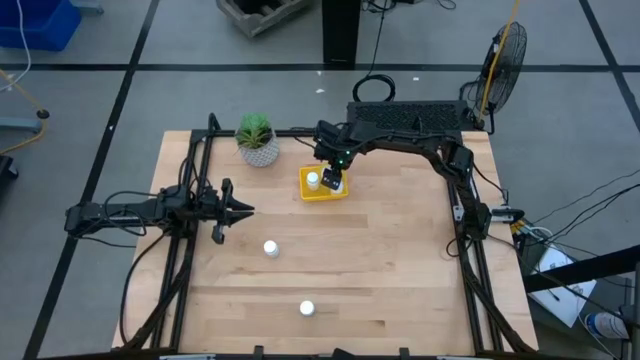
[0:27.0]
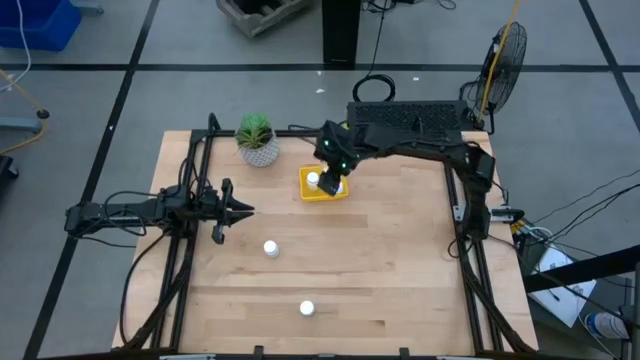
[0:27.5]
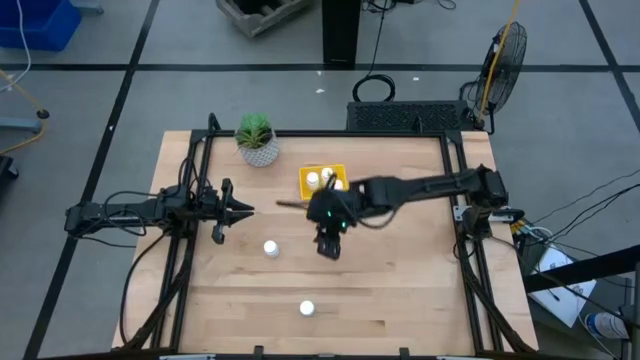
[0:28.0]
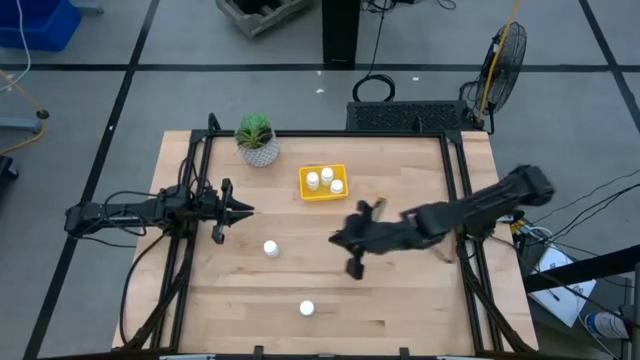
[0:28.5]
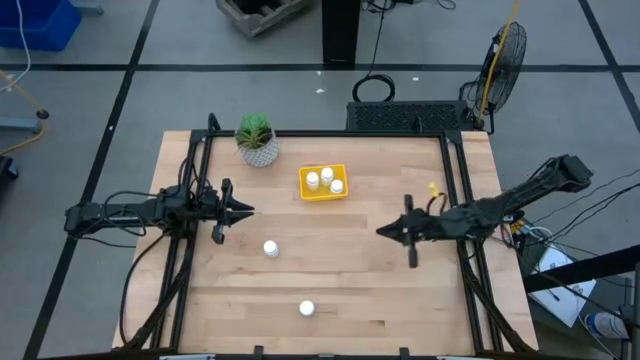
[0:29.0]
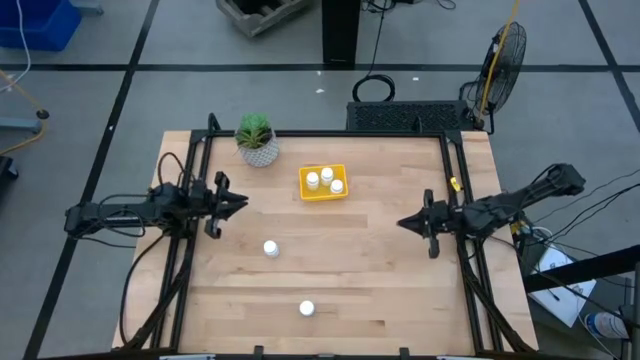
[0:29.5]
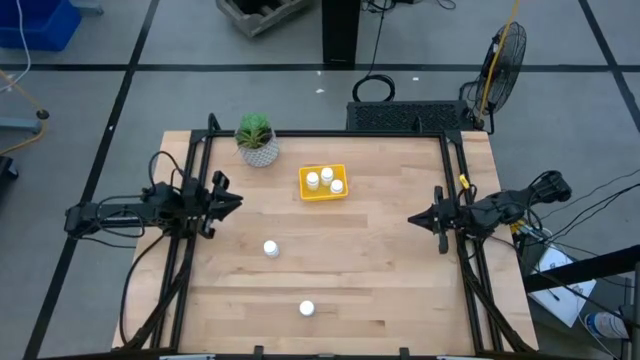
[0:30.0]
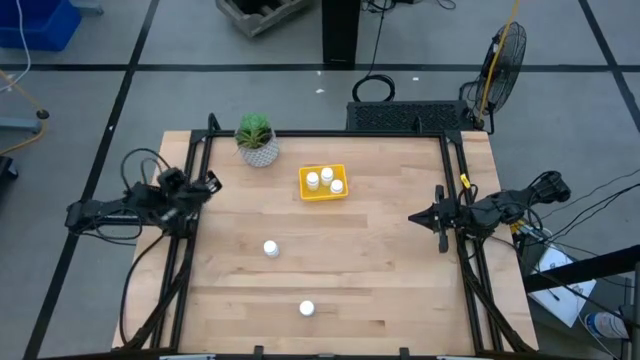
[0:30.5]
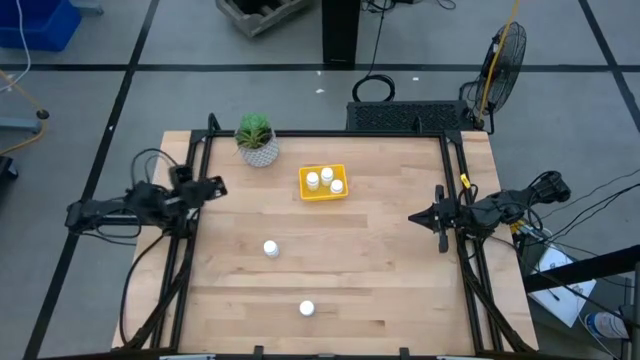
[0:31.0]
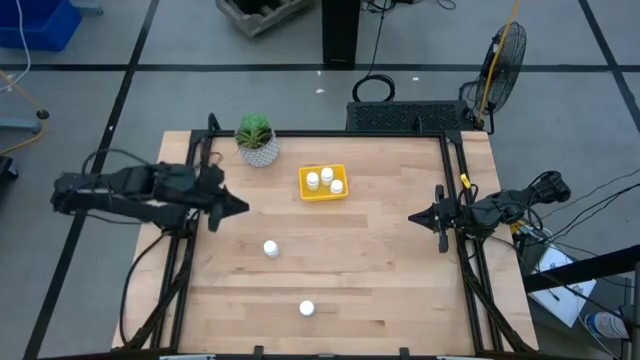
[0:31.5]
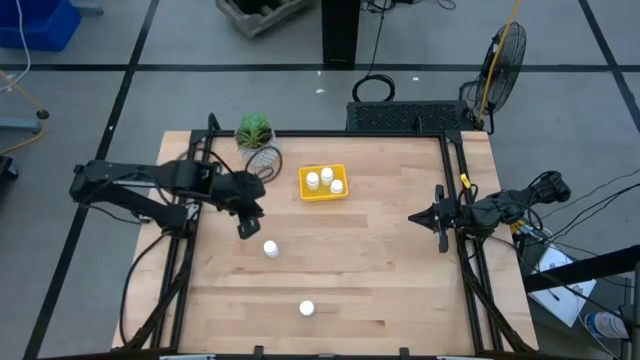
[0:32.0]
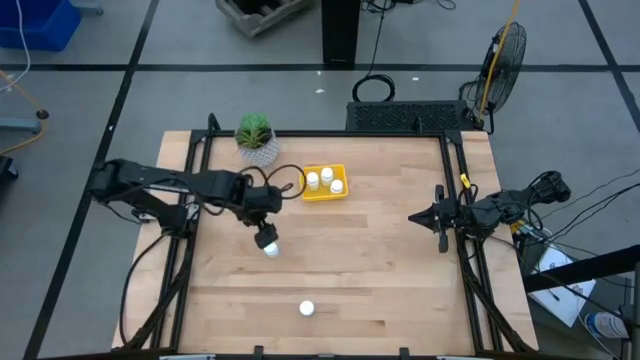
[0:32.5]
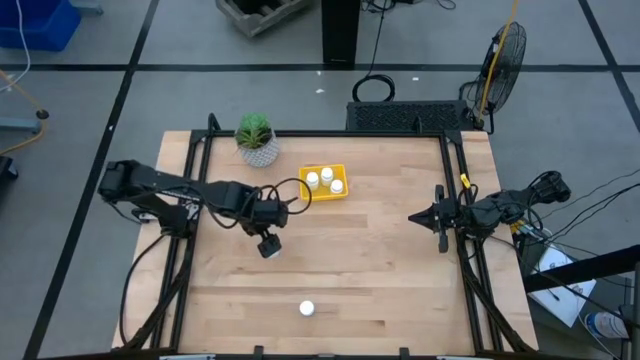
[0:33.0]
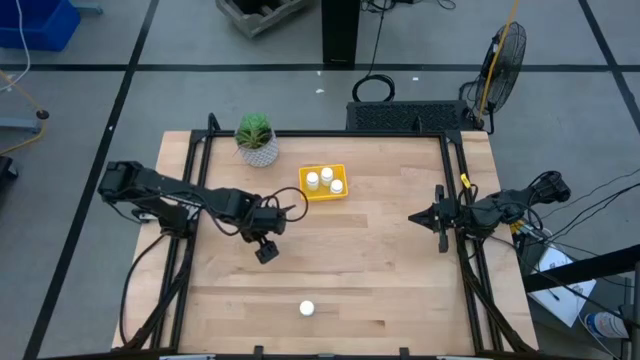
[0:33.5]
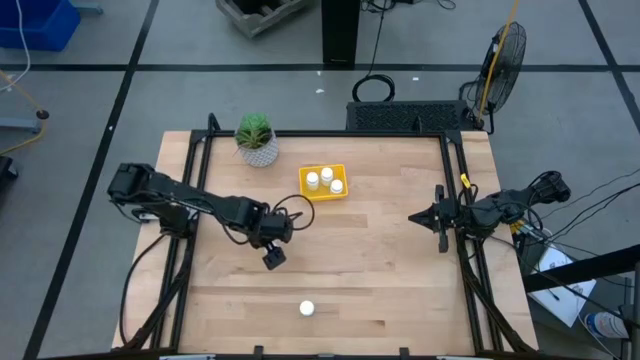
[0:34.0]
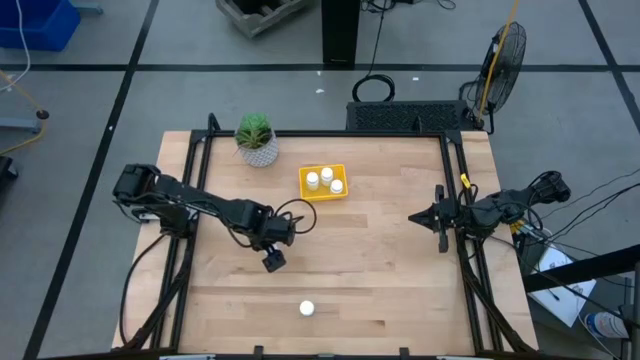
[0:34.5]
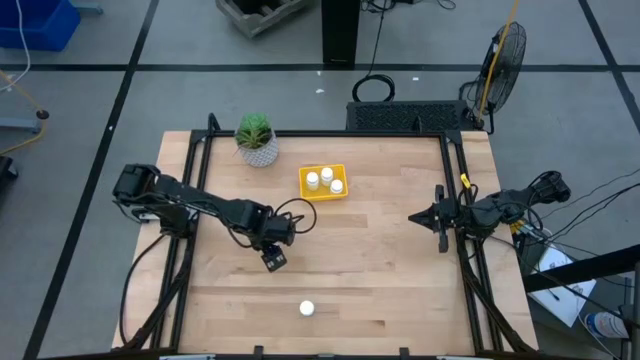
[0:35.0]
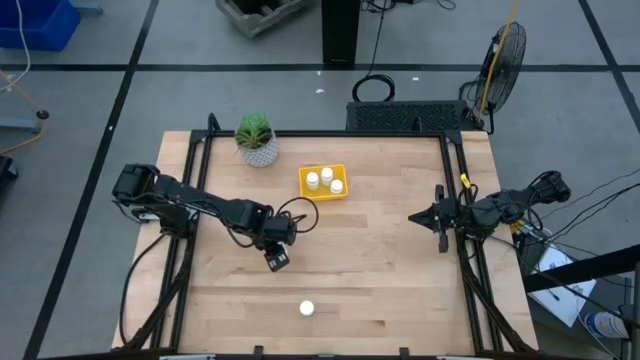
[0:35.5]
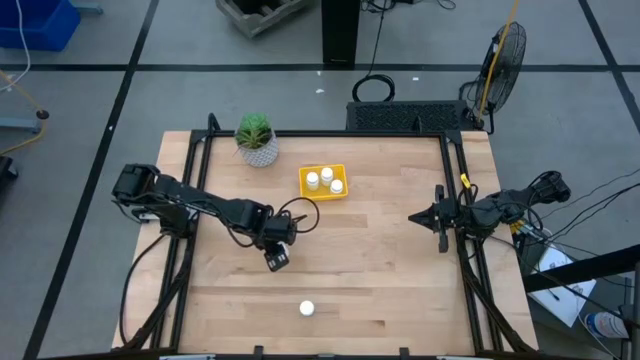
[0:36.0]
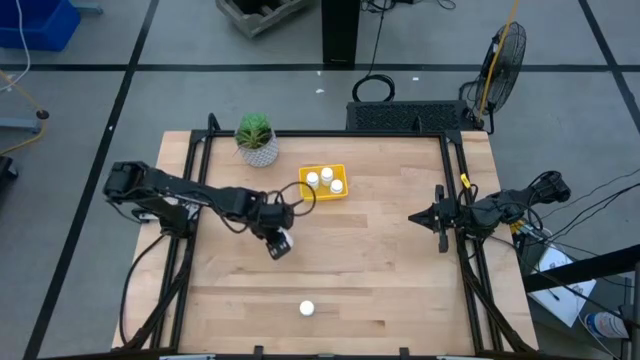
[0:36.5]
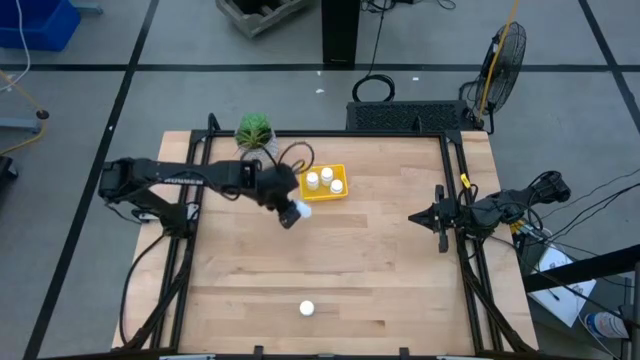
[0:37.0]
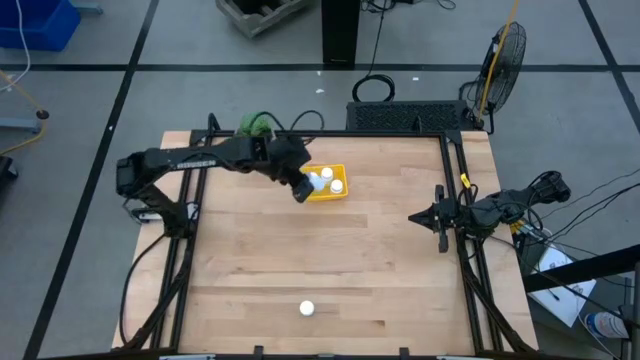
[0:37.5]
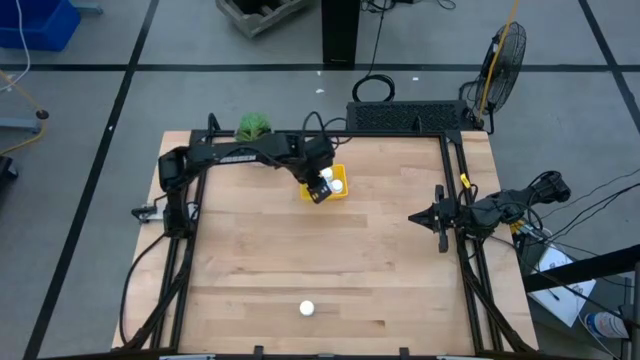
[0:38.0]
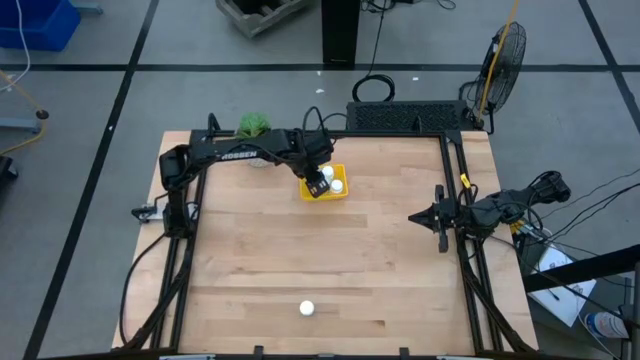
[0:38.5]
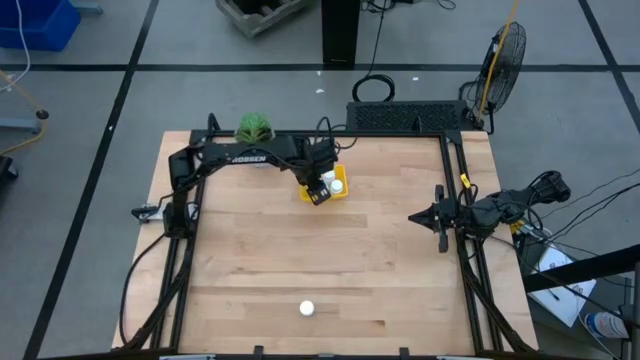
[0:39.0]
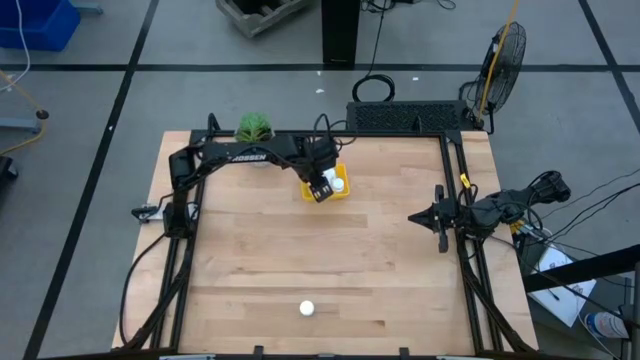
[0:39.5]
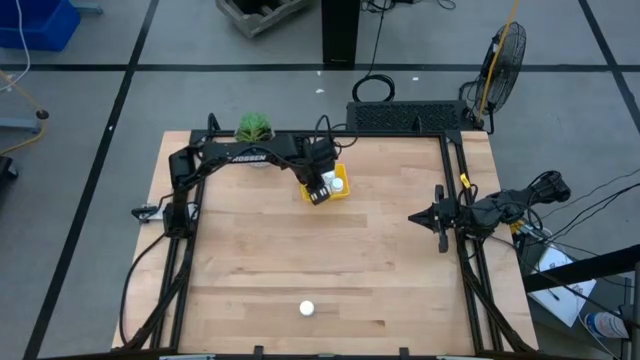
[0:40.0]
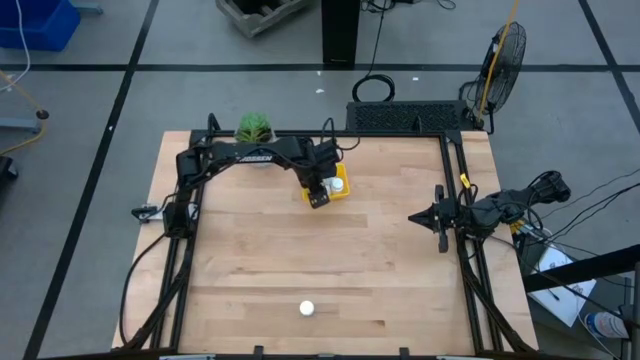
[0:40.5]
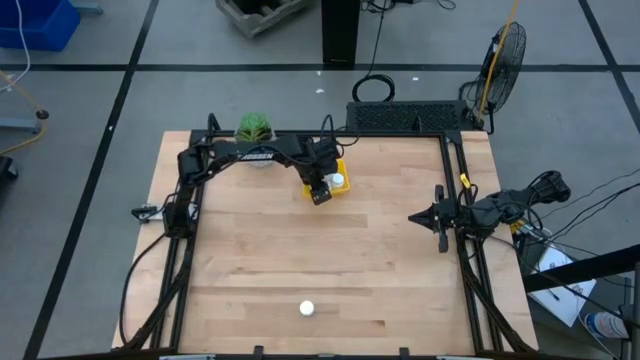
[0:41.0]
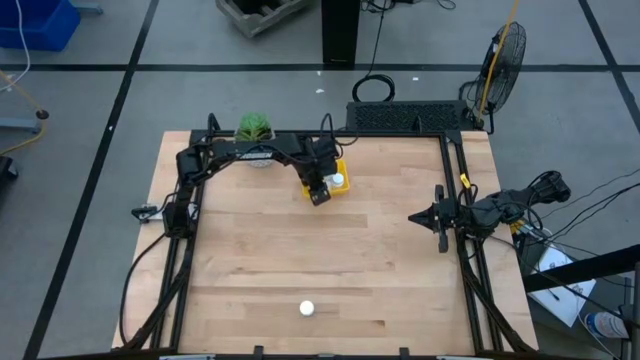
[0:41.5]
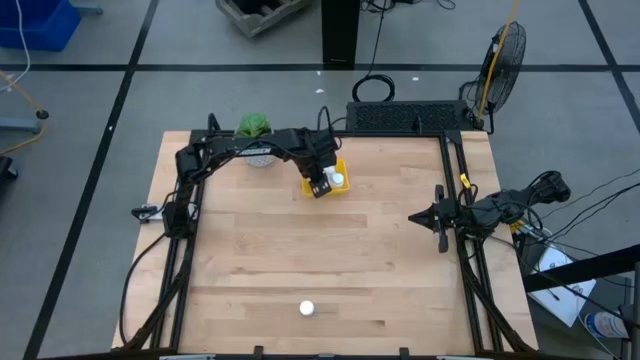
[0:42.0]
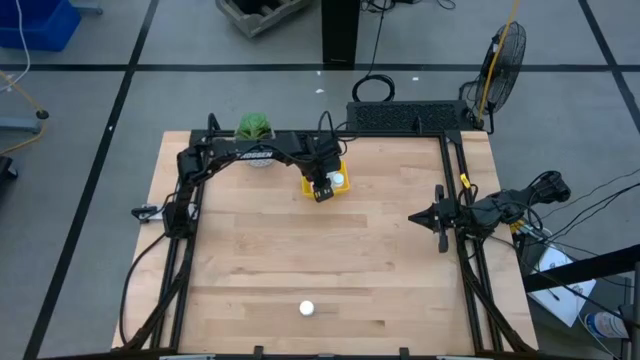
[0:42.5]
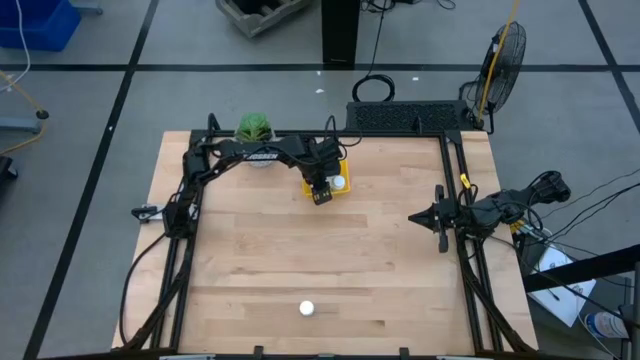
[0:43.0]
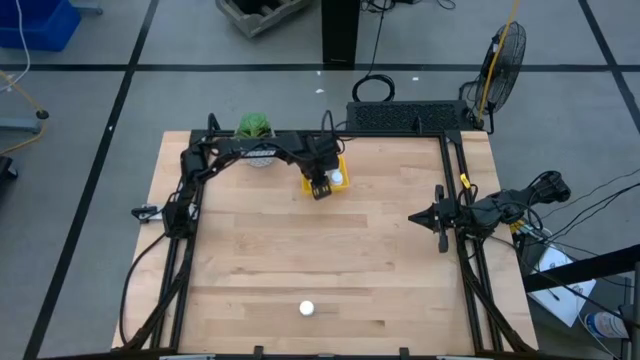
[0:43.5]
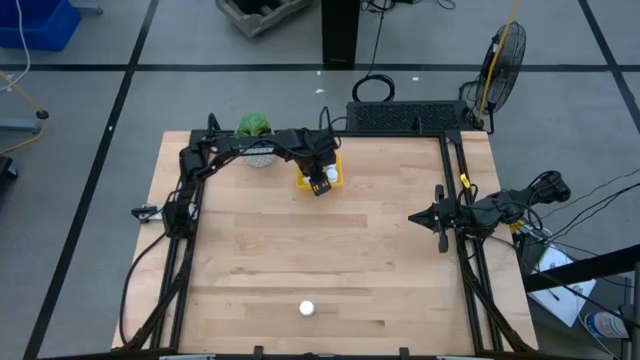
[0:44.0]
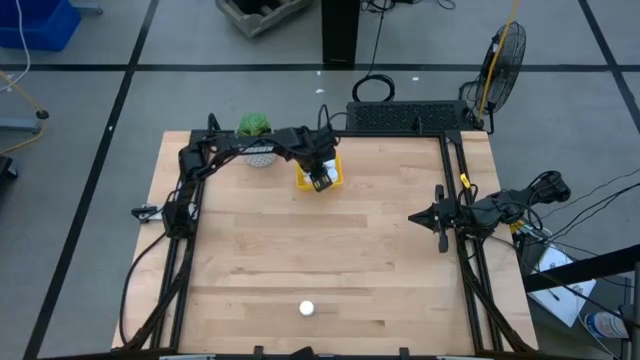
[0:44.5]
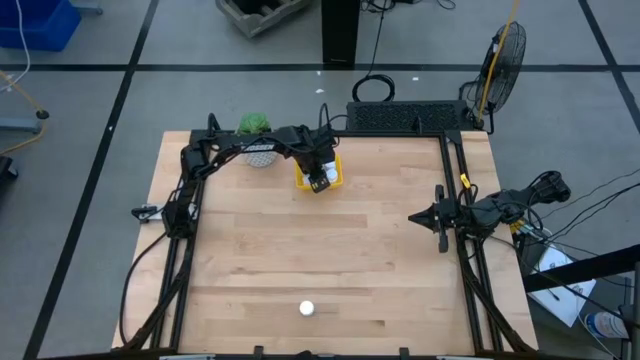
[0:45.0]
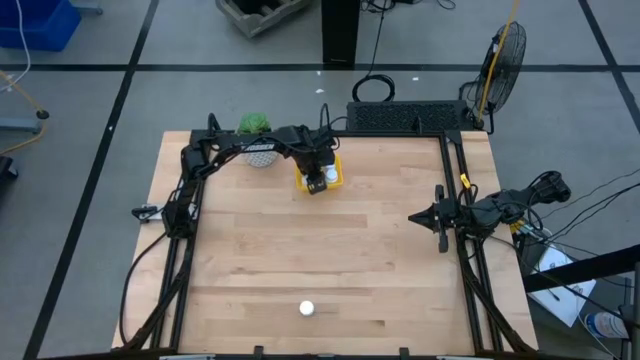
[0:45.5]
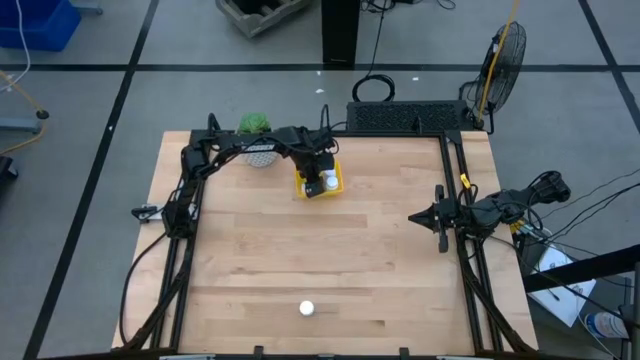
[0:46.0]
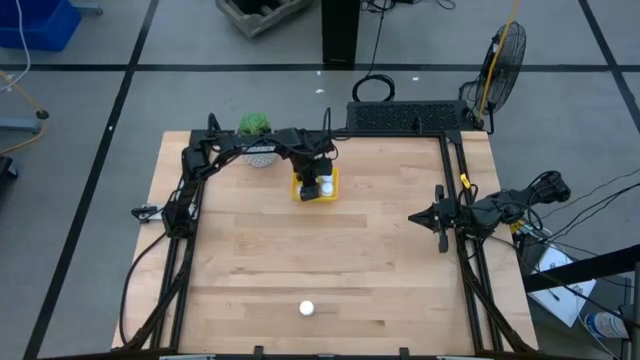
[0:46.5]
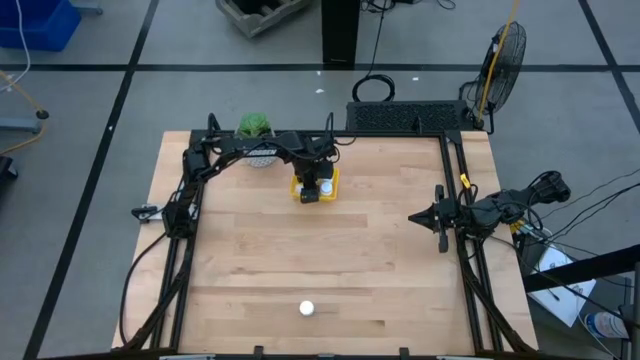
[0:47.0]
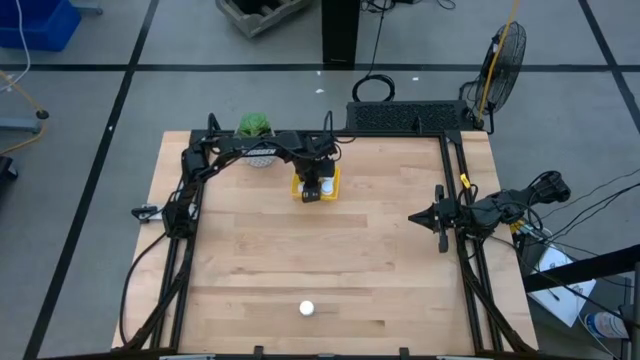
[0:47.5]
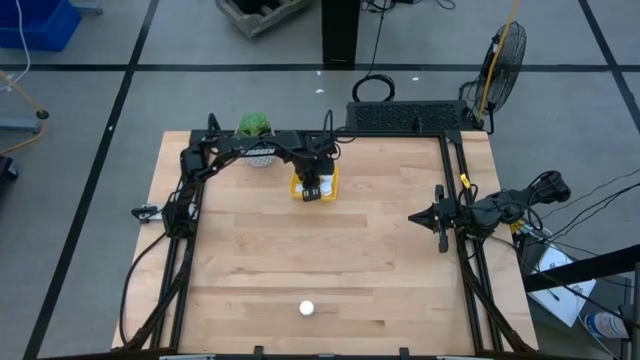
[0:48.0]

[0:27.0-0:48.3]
Task: Pick and place pill bottles into a basket
Put the top white pill bottle into the yellow basket
